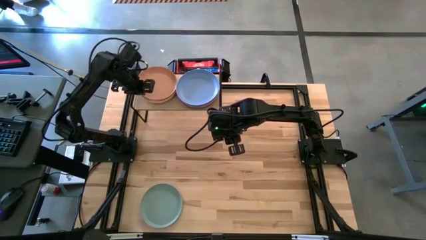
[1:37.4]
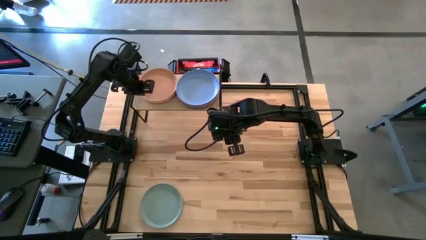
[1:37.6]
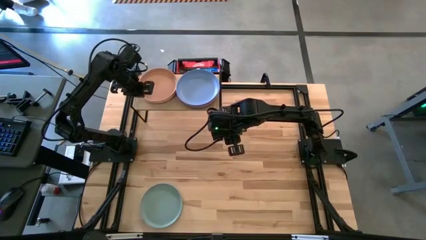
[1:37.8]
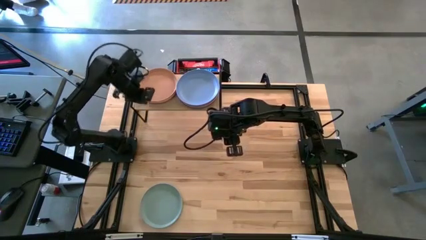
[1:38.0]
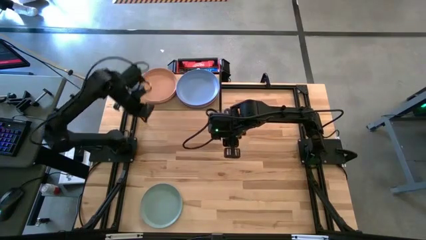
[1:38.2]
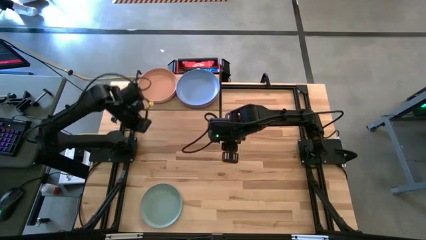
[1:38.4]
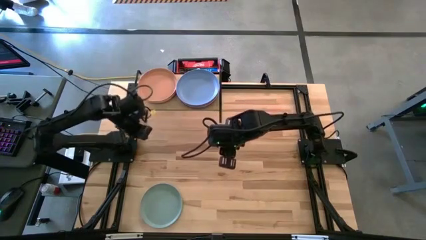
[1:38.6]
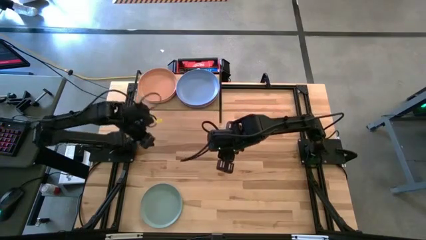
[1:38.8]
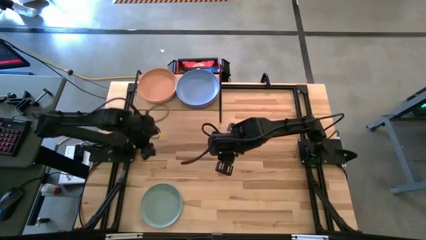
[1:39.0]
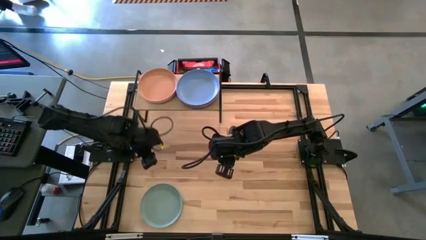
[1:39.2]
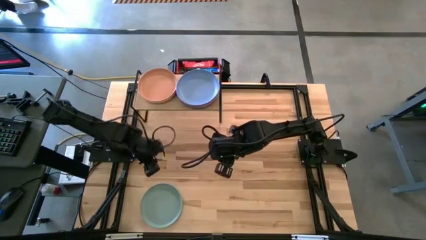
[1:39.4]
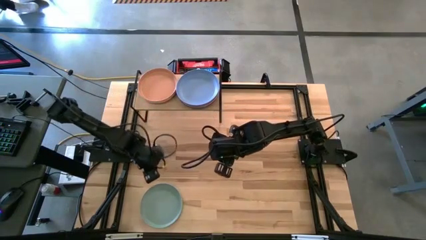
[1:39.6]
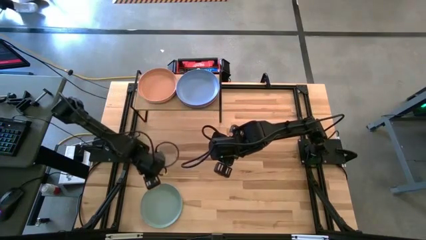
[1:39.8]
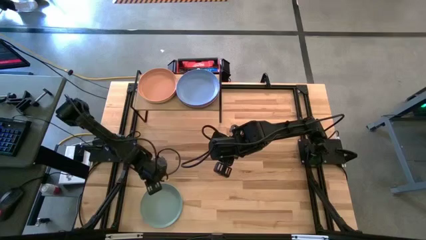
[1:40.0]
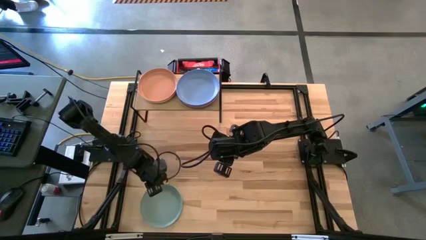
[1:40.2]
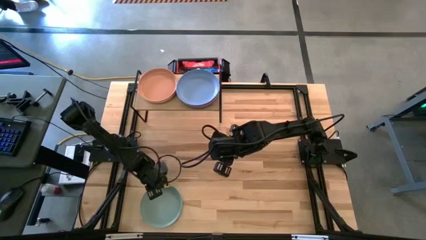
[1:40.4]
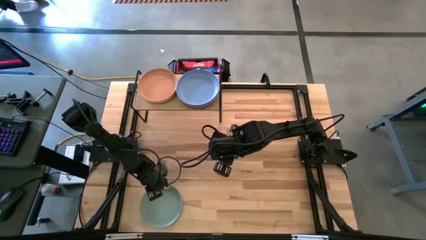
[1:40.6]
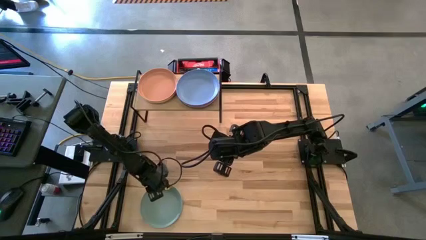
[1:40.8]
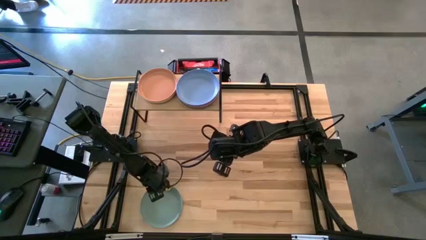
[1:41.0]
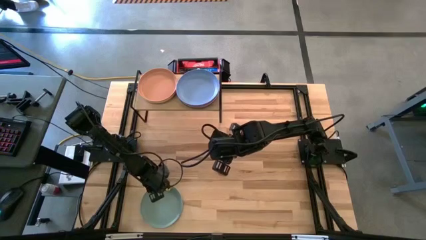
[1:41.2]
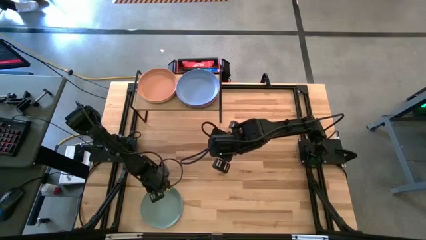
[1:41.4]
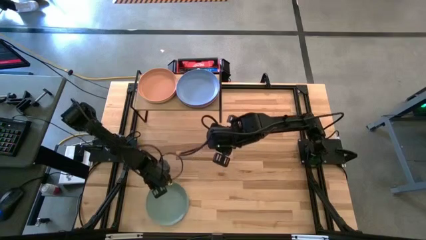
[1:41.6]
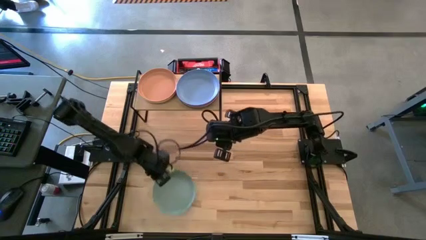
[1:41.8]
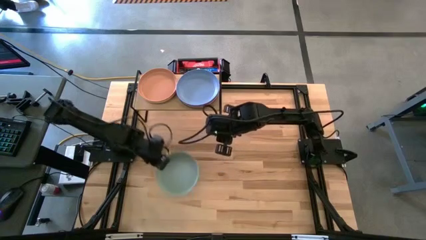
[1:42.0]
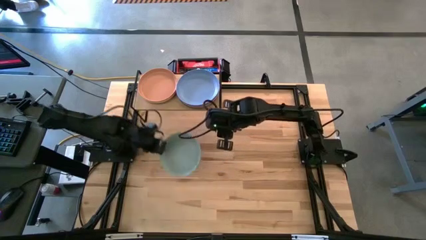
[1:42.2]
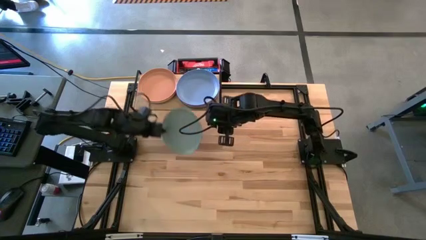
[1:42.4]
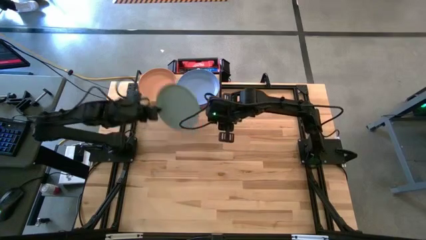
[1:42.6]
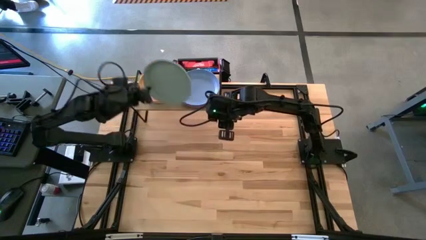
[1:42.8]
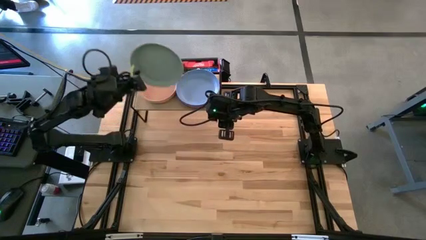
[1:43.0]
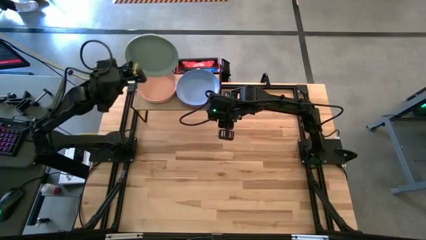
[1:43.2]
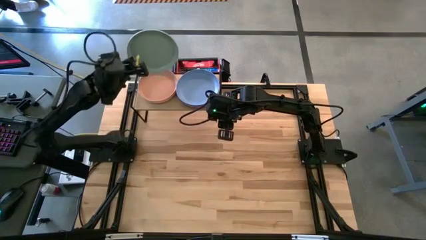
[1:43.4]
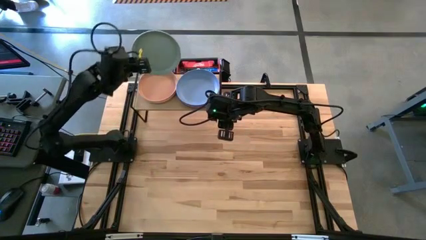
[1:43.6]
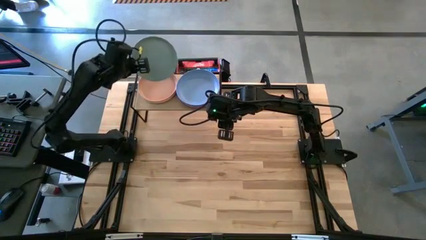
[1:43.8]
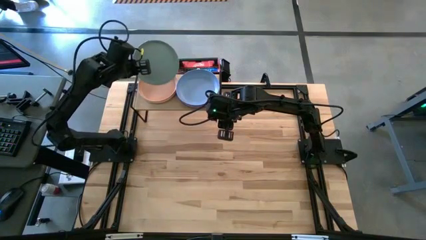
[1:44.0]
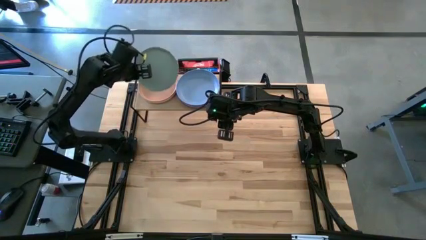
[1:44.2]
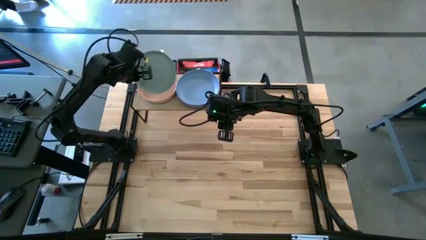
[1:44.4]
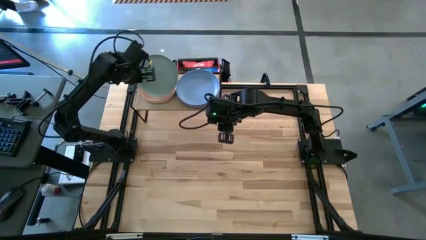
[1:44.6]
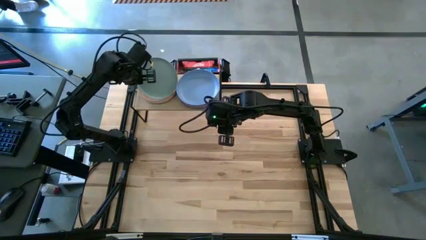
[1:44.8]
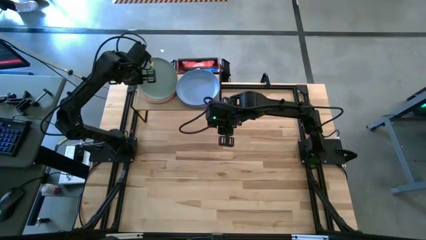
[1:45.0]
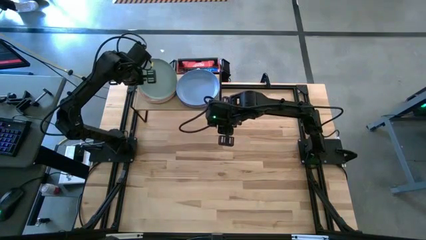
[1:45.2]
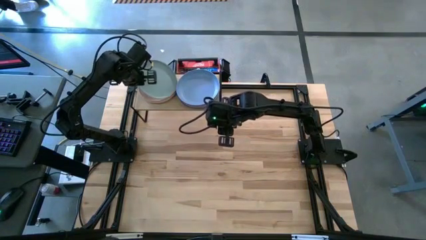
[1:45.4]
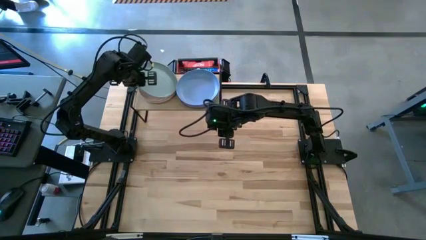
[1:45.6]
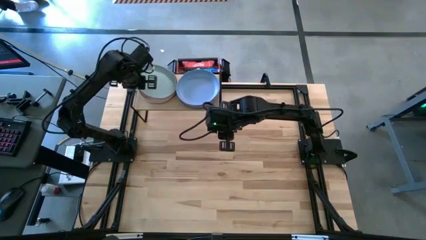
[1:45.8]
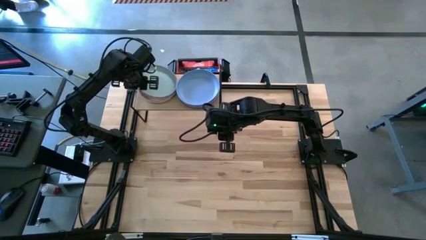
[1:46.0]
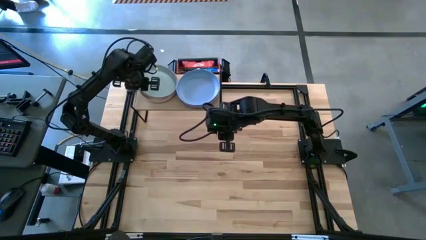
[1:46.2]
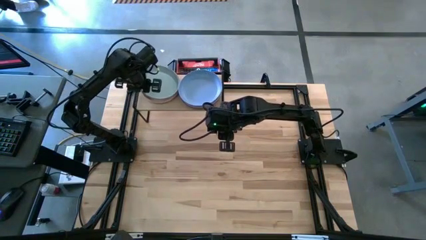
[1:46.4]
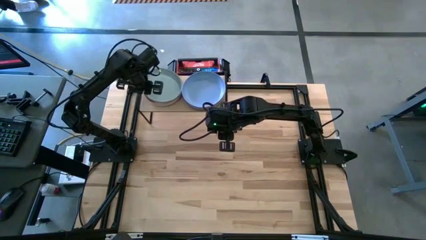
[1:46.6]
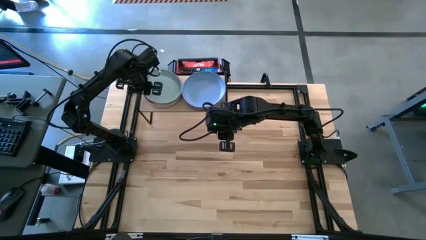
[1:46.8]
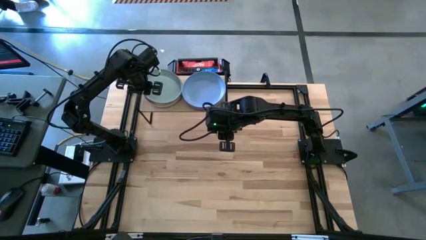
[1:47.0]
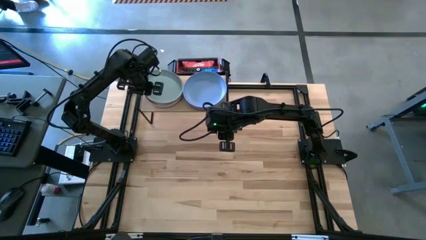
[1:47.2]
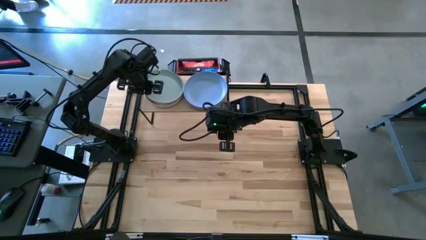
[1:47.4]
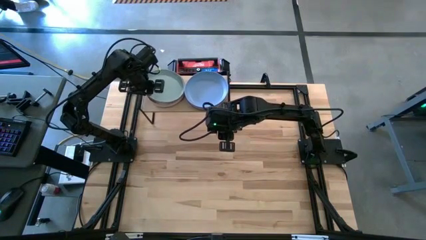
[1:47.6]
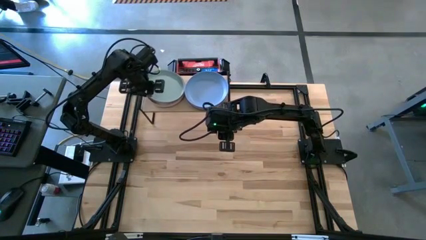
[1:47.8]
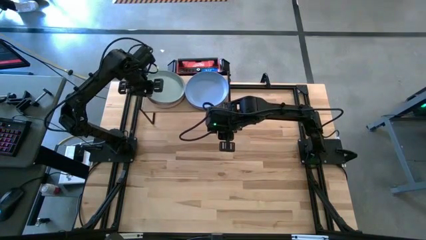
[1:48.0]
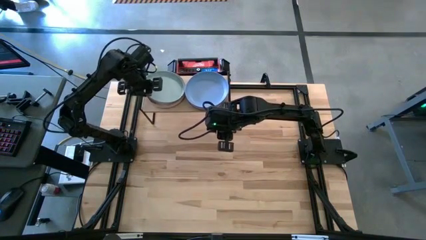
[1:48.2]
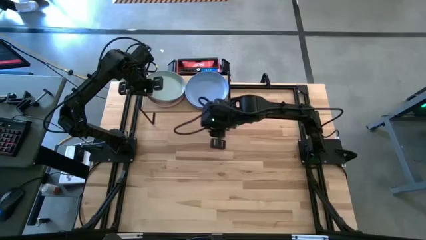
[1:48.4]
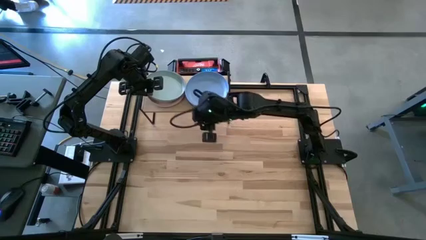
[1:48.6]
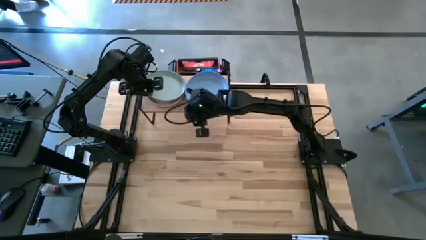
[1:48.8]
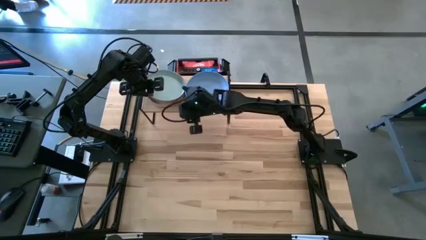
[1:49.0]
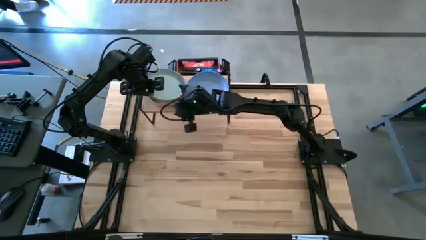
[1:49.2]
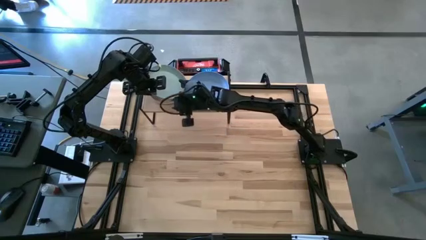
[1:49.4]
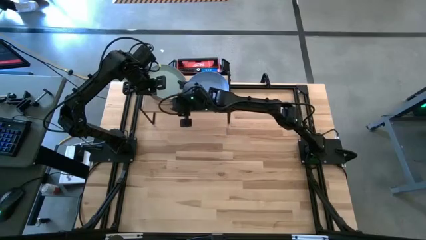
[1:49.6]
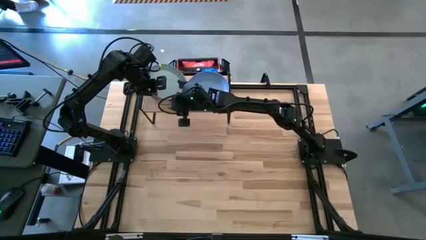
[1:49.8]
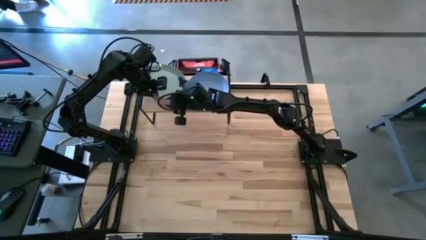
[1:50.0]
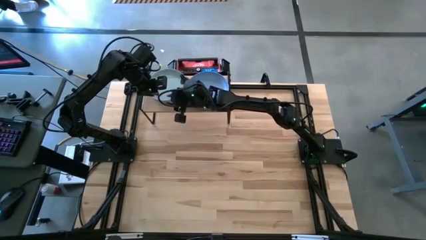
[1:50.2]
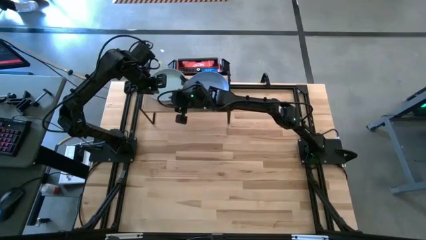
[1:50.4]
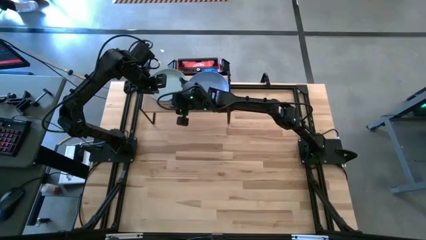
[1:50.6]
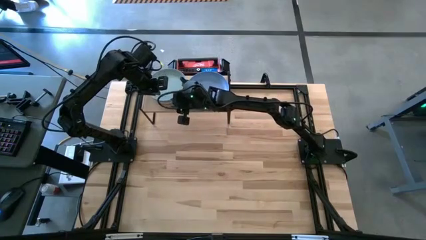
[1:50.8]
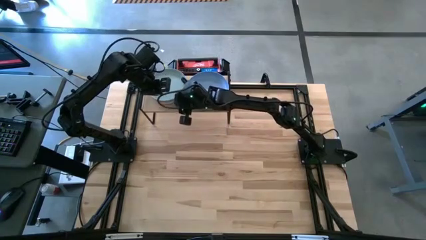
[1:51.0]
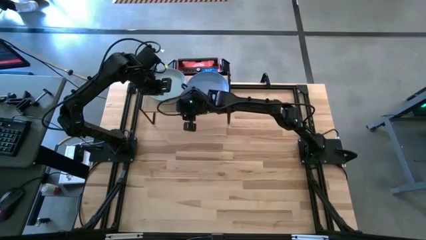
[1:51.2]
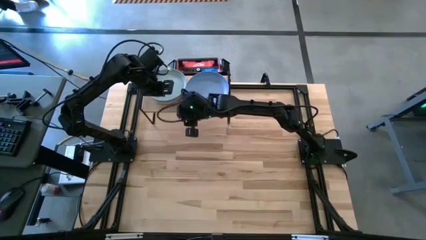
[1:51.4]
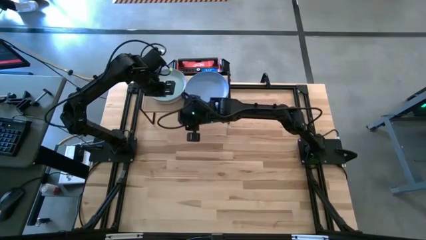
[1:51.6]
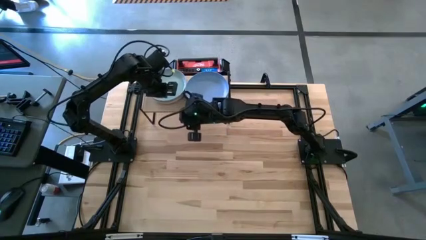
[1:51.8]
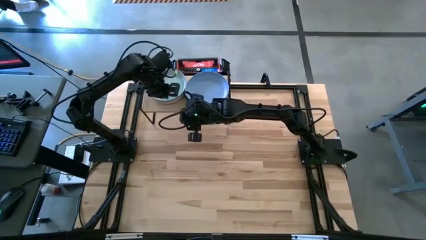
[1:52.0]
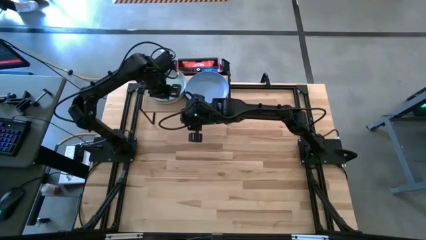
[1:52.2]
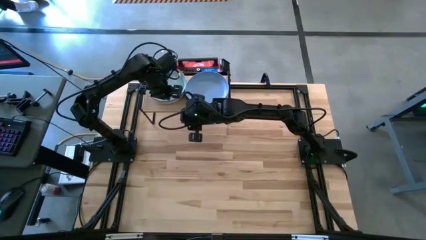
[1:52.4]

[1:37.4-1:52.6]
Task: Place and stack plates onto a shelf
Stack the green plate on top the light brown plate on the shelf

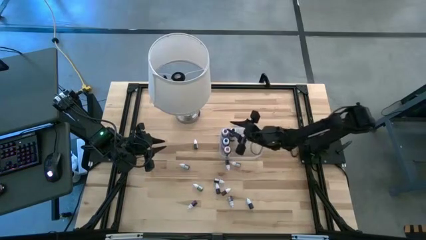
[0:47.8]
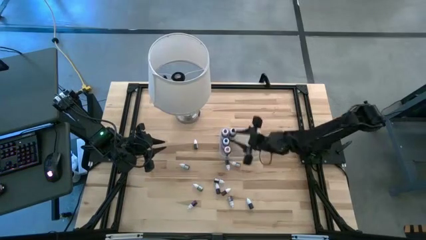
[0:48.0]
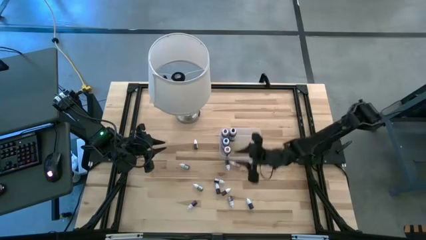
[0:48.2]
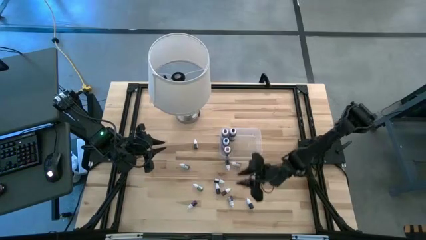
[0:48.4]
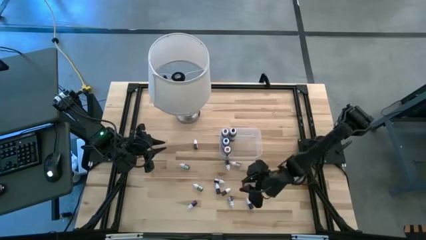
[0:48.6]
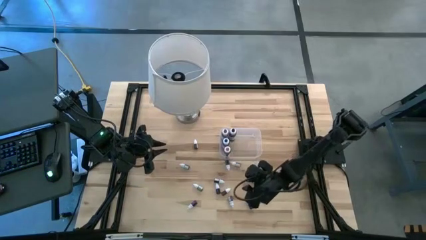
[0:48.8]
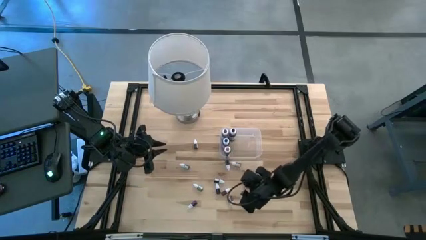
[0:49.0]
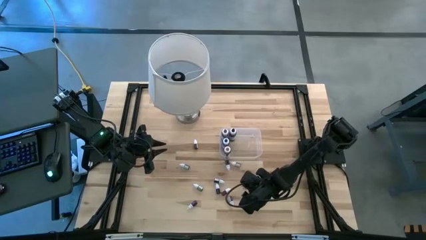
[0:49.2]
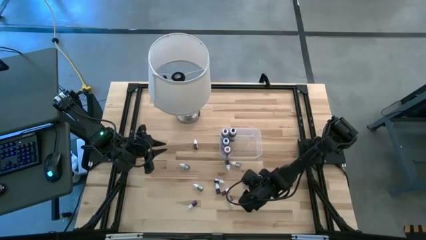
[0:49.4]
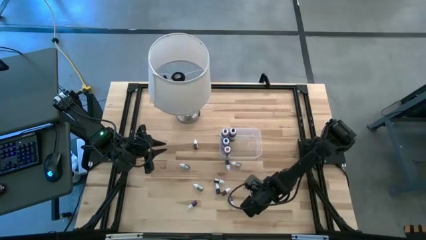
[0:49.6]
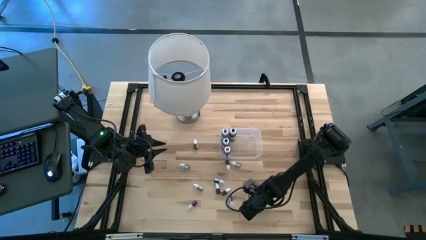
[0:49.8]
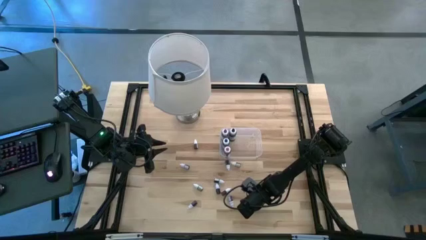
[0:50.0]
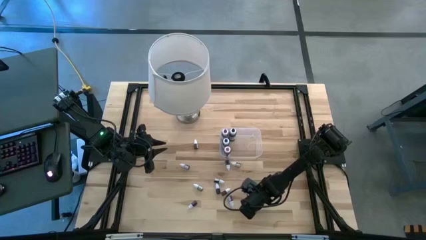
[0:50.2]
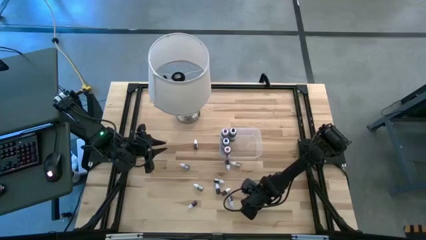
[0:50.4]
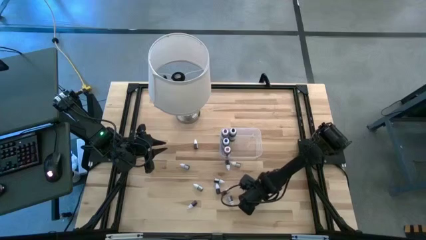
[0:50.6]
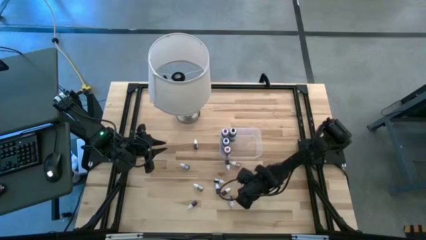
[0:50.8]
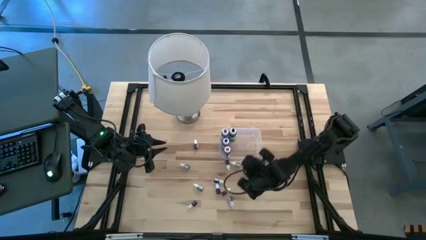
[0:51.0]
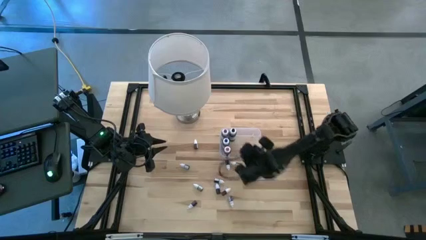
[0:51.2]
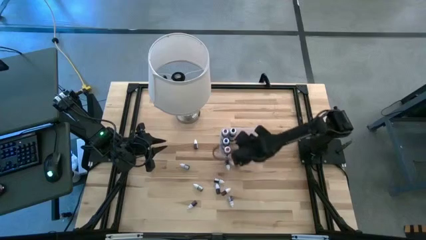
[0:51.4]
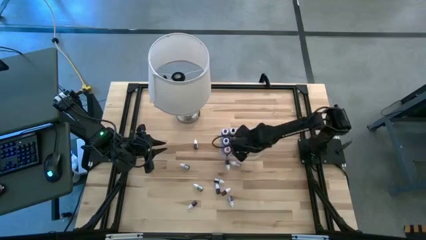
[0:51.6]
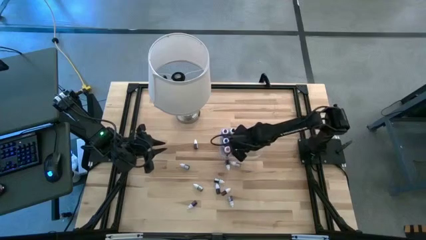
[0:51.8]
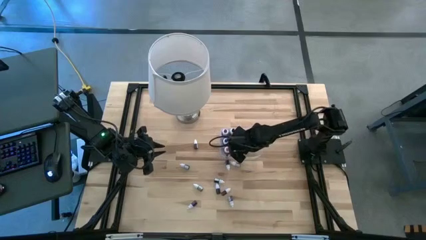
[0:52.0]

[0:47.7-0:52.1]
Task: Pick & Place food coloring
Put the right small black food coloring bottle into the transparent bin
